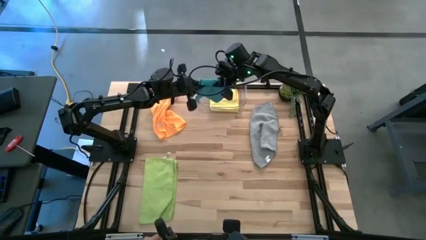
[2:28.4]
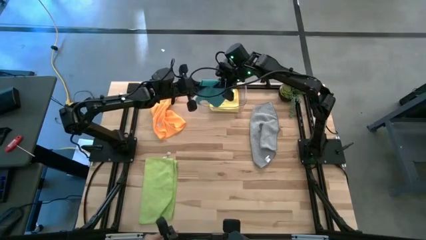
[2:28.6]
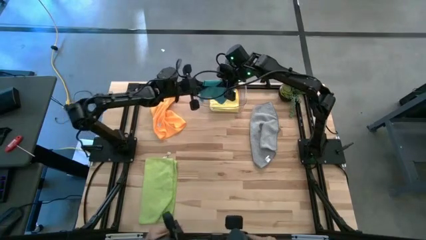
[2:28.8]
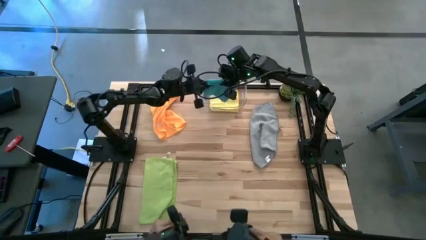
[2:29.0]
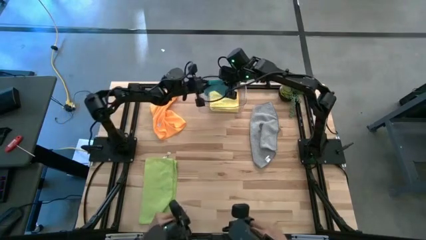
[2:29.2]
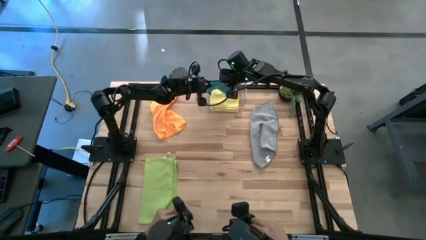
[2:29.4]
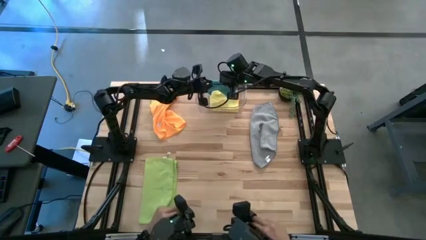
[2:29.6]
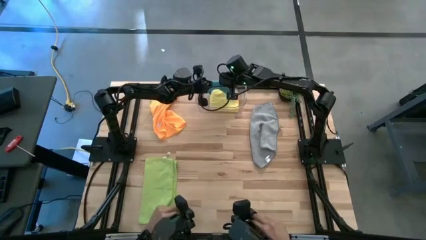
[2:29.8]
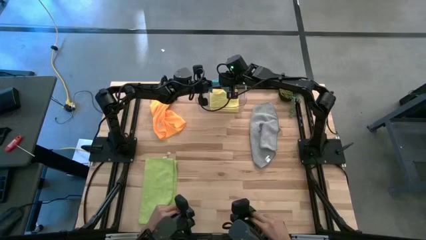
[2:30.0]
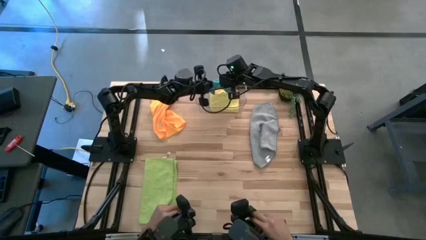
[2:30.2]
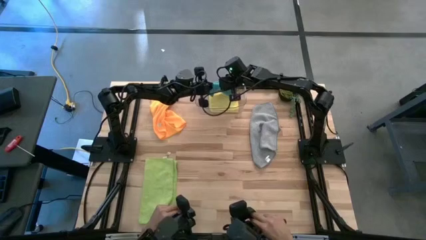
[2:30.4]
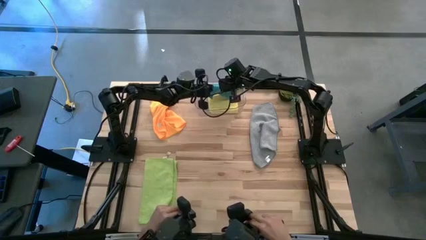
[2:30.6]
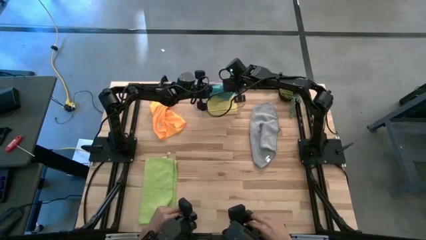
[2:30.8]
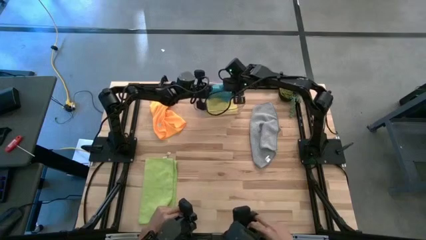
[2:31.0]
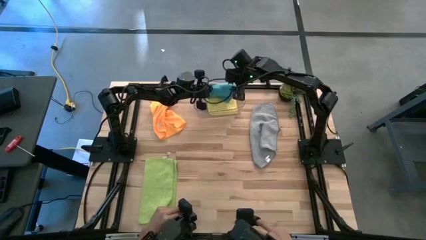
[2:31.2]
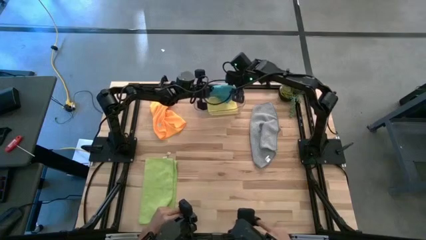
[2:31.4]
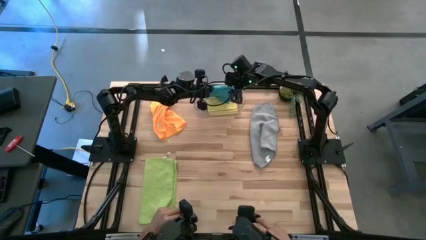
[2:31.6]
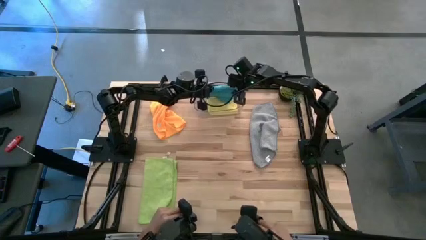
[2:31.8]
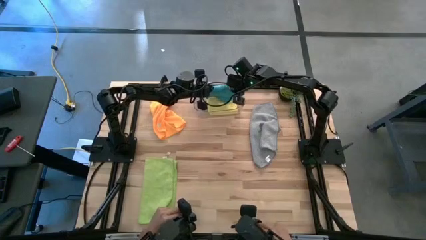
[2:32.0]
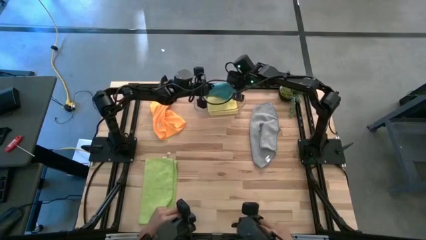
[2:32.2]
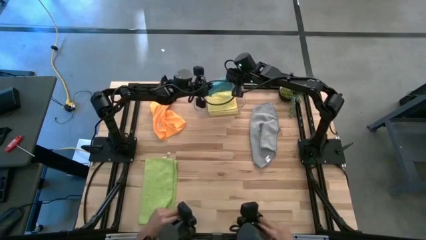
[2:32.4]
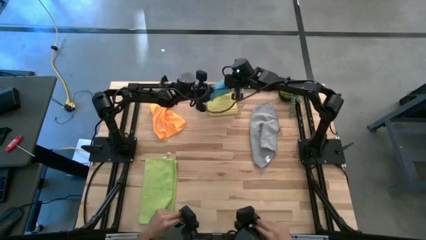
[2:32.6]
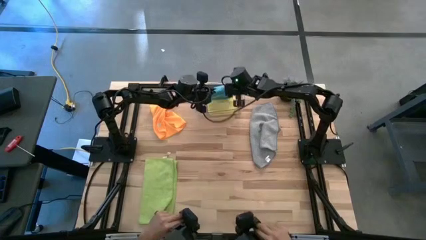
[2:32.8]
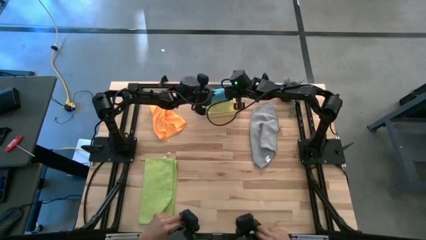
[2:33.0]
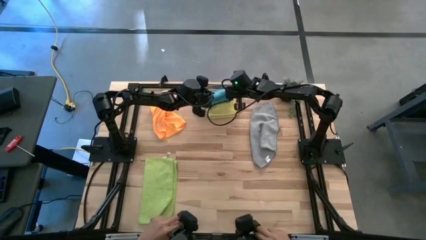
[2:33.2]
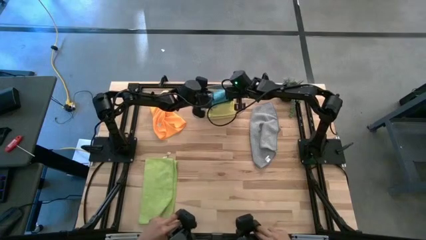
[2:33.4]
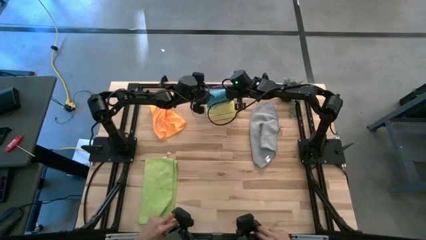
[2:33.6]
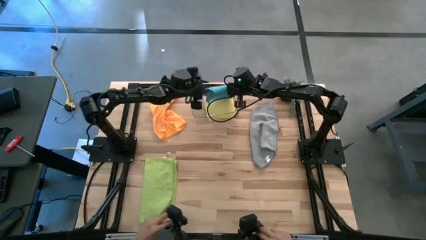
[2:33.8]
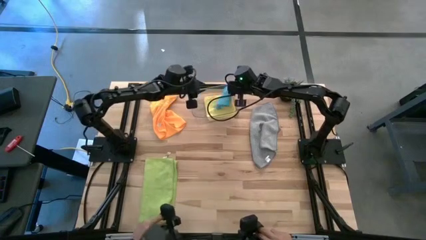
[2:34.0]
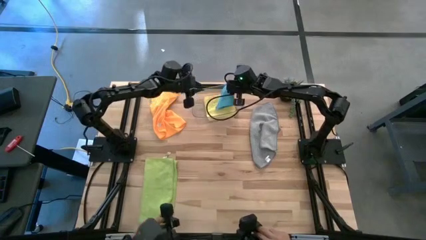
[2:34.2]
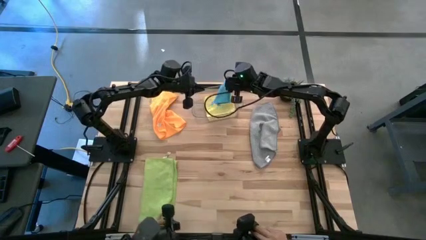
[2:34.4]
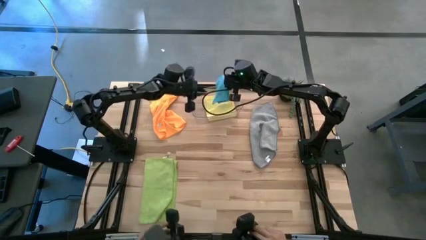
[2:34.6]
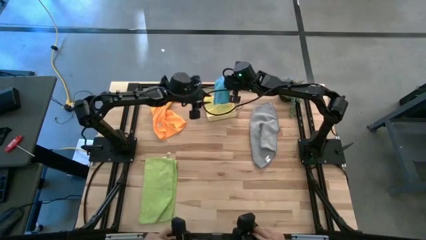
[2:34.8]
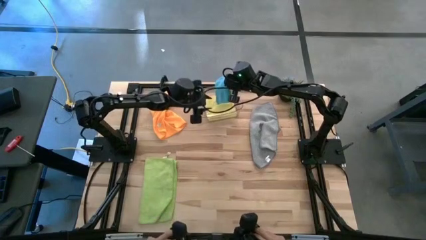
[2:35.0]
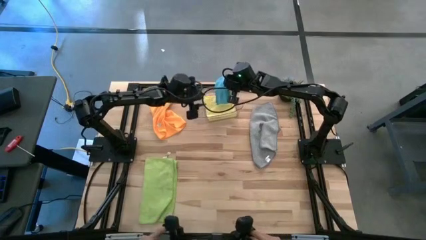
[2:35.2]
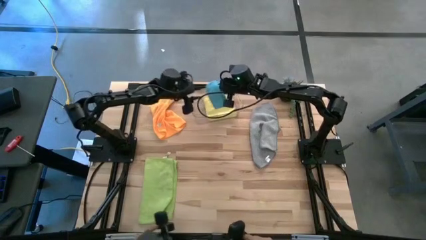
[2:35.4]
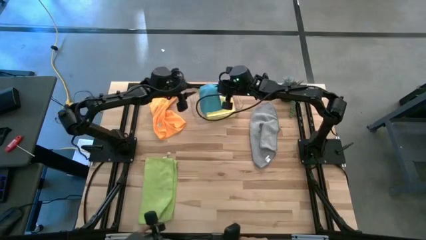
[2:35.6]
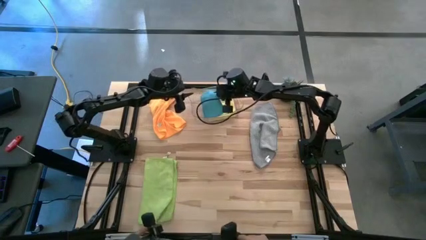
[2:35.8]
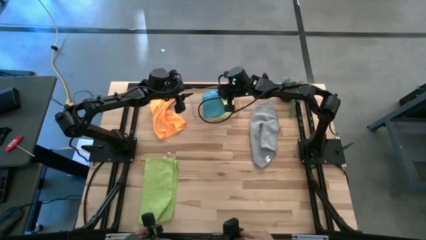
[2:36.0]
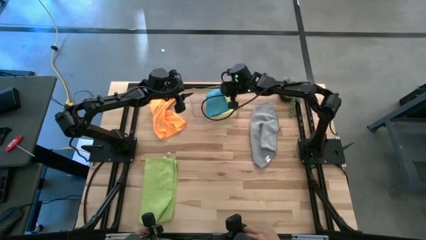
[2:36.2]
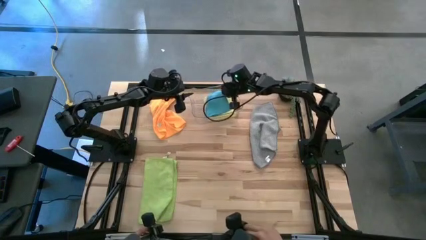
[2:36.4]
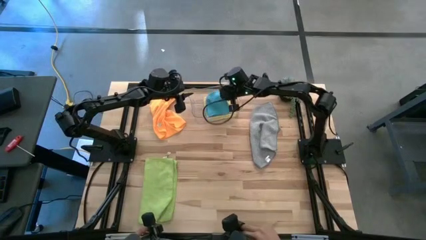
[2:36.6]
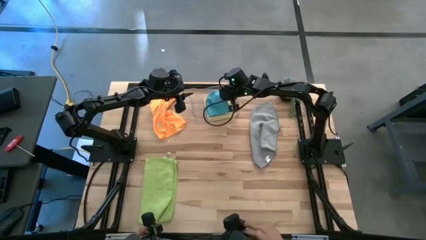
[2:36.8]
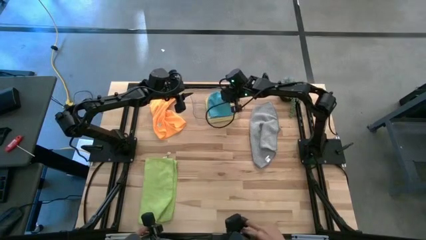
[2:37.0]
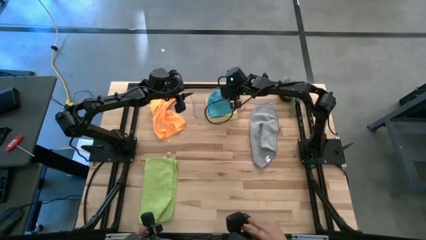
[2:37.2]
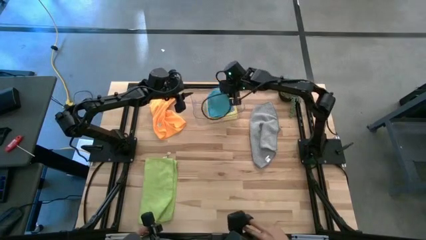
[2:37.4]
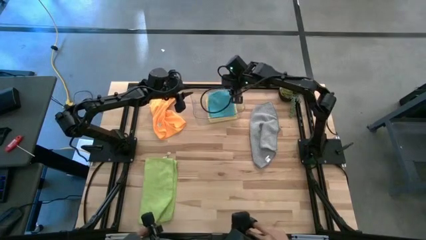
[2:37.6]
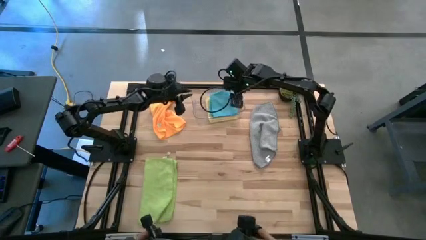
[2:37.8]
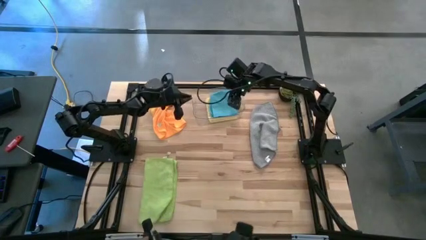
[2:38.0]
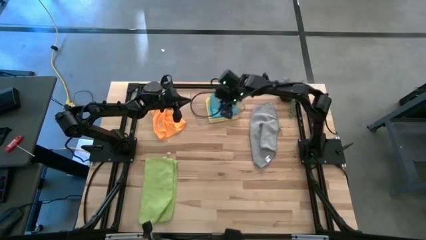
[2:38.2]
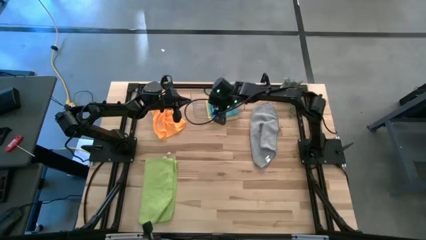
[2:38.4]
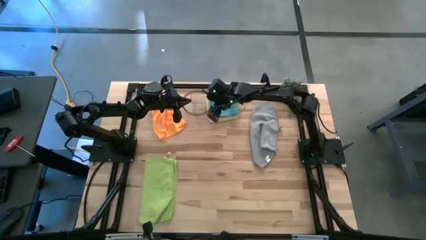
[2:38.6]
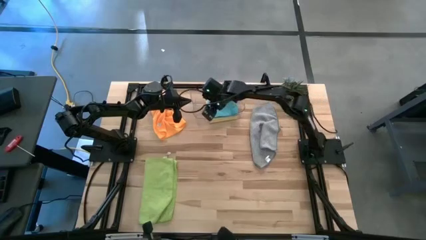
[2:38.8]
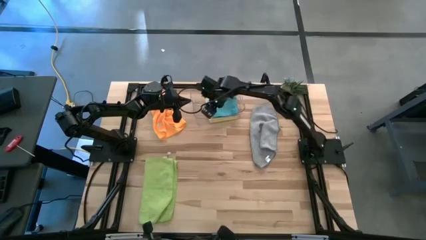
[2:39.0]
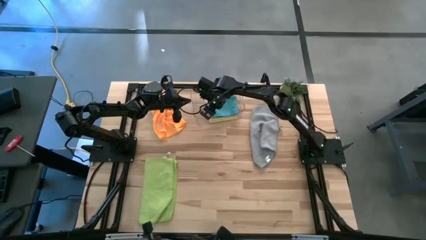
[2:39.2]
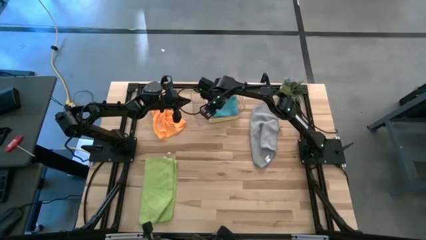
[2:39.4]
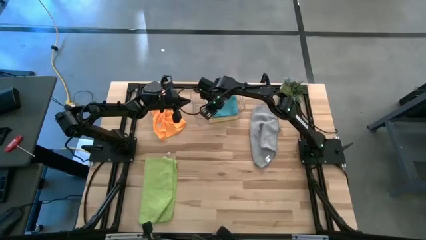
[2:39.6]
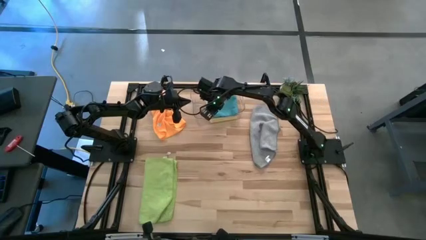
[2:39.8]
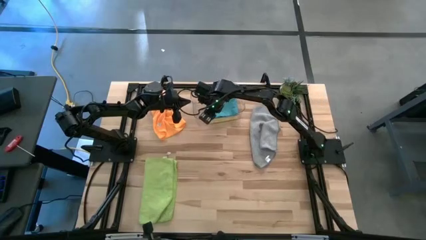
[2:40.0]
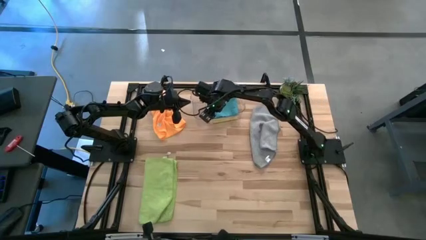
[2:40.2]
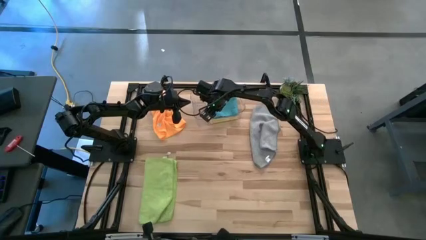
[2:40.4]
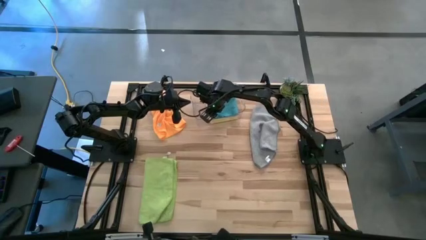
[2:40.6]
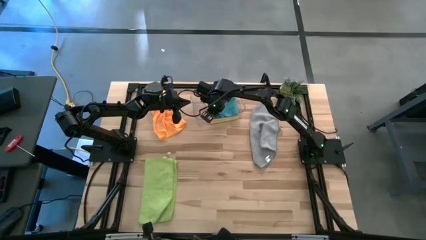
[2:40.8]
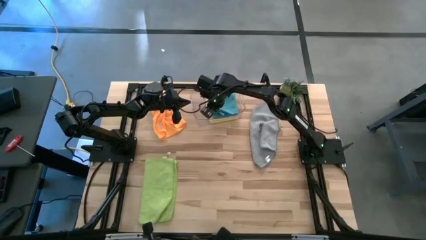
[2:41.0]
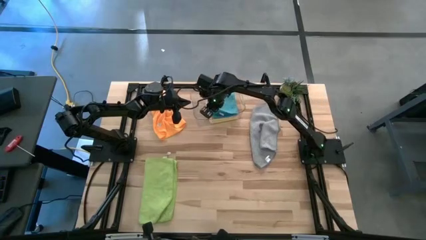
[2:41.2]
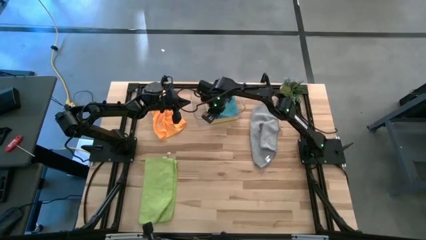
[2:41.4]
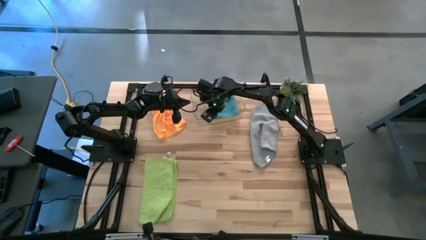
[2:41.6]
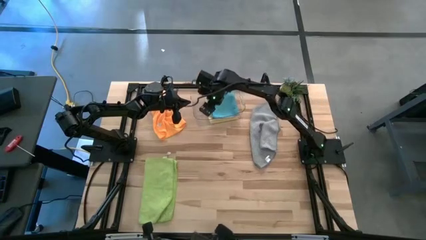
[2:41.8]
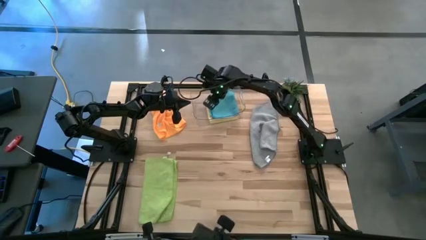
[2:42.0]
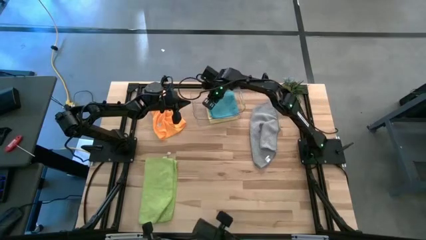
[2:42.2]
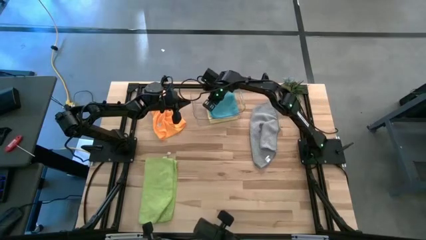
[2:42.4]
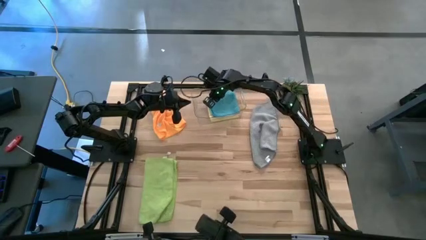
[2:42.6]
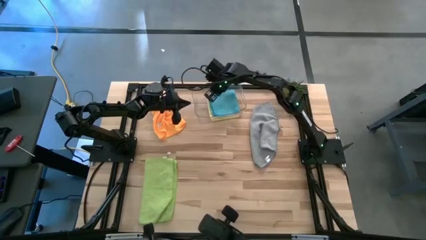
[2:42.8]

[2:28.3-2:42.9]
Task: Fold microfiber towels
Stack the blue towel on top of the yellow towel in the transparent bin

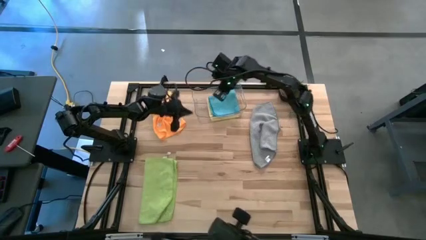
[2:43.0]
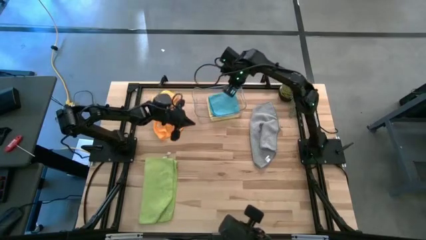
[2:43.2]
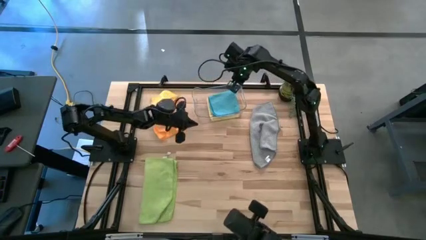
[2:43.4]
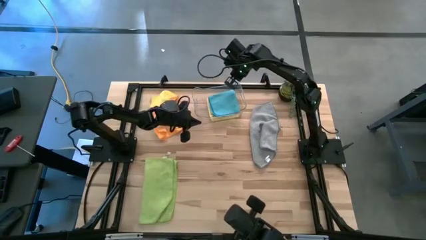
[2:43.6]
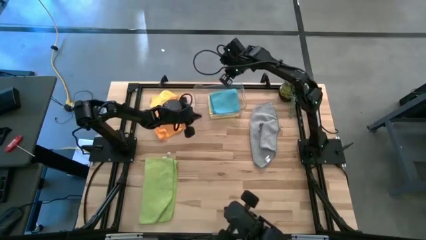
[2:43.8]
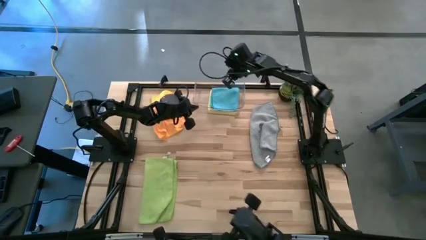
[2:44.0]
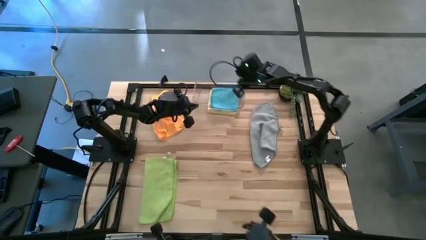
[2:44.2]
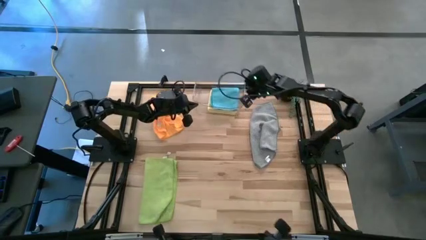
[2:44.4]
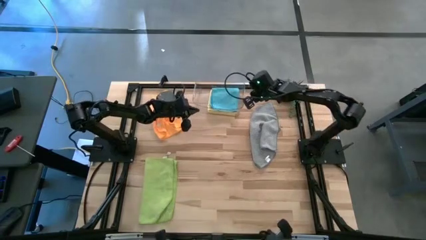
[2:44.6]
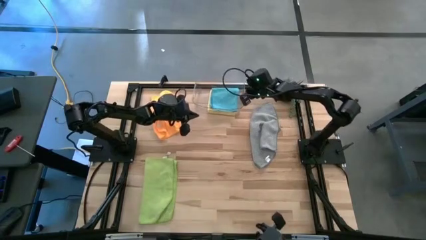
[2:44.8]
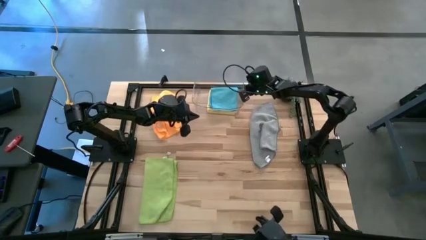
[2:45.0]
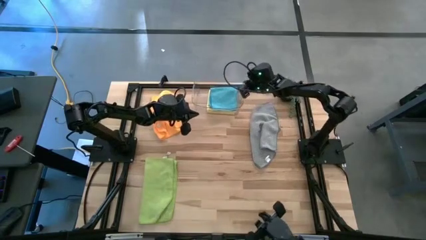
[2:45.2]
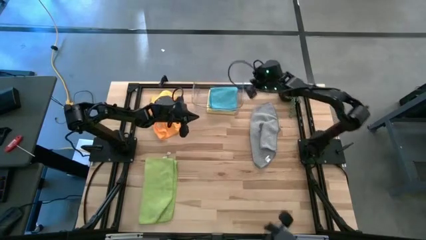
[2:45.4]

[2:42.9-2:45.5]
Adjust the transparent bin
